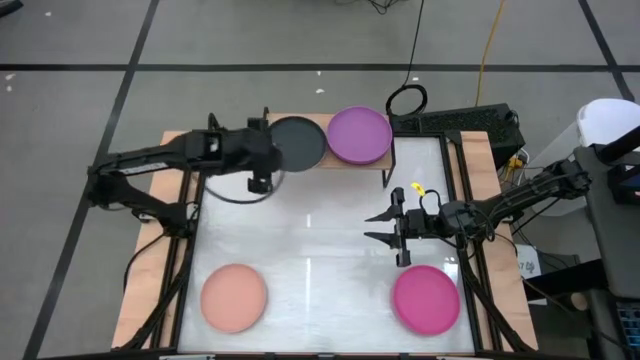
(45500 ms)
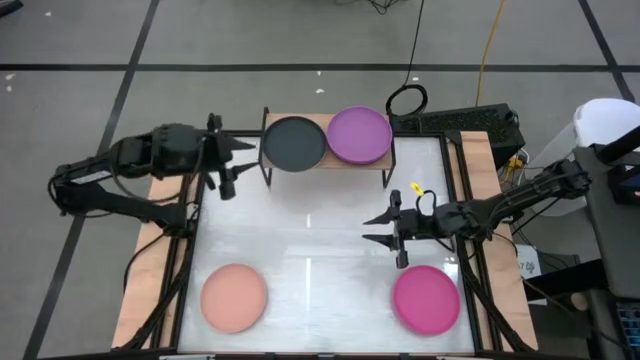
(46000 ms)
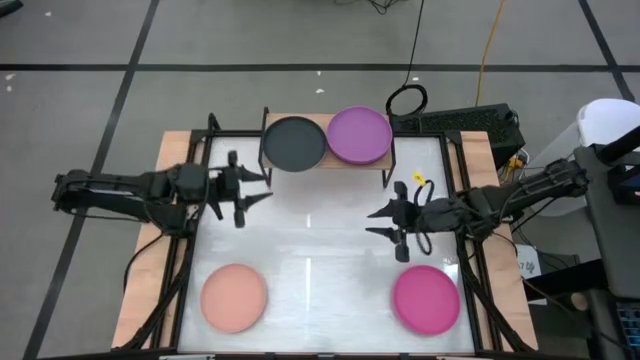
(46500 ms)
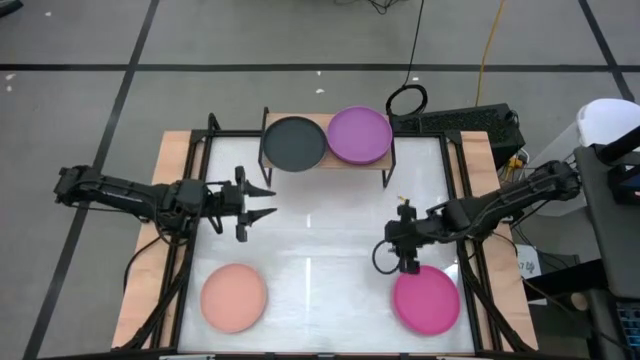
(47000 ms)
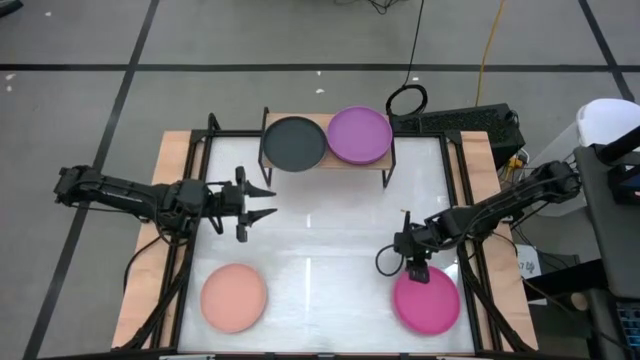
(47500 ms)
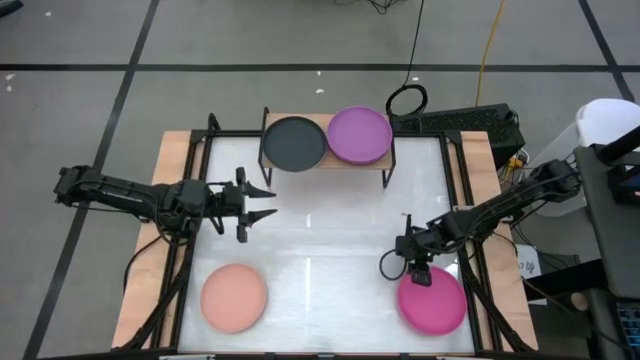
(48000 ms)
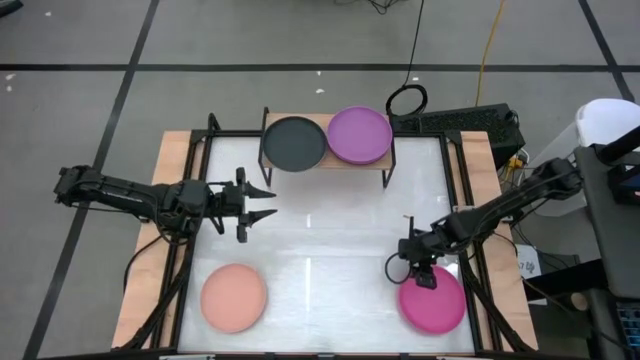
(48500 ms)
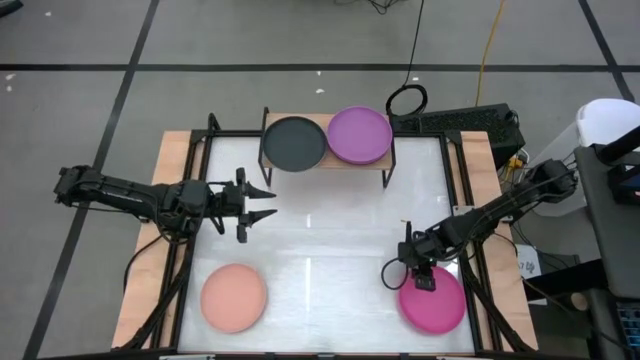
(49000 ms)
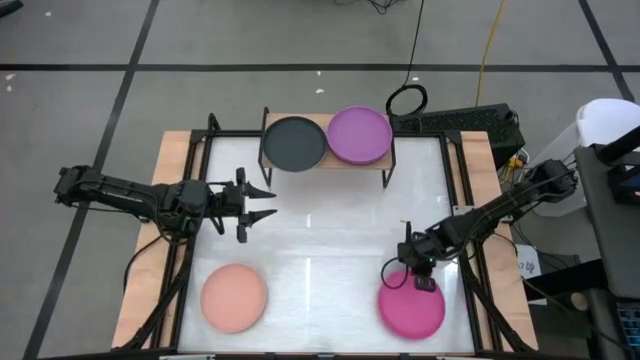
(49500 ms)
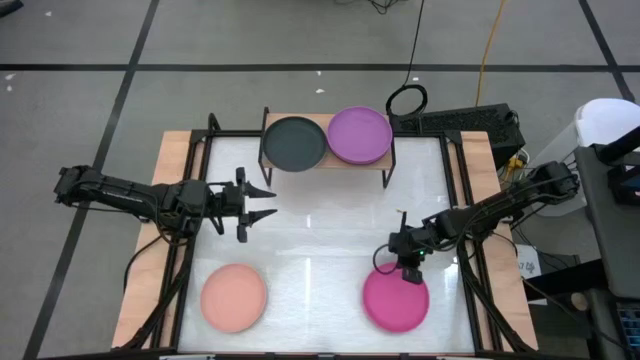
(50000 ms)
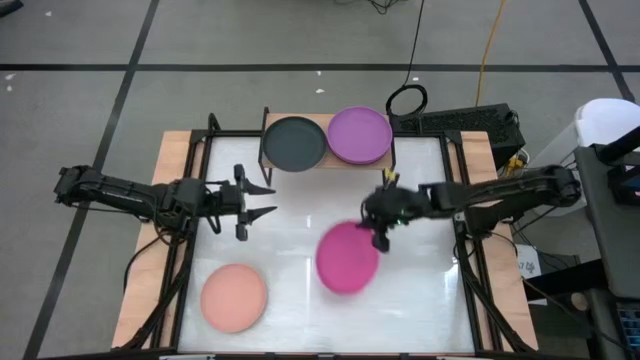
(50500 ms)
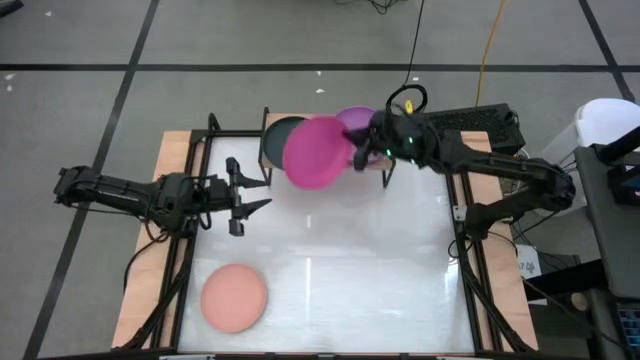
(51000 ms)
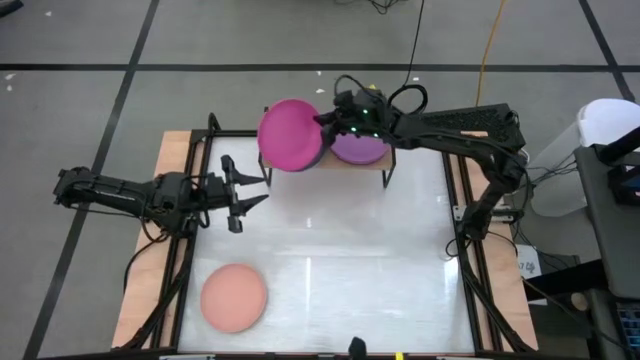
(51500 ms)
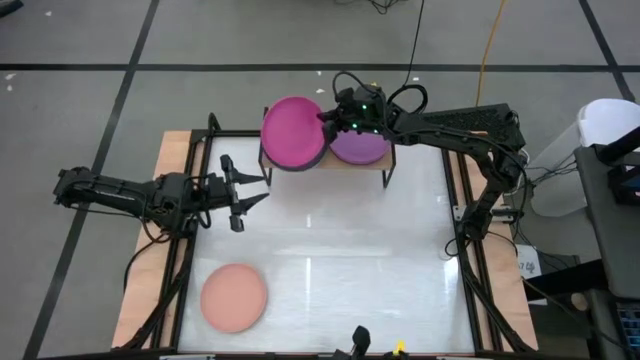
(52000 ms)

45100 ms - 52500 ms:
Task: Place and stack plates onto a shelf
Stack the pink plate on top of the black plate on the shelf

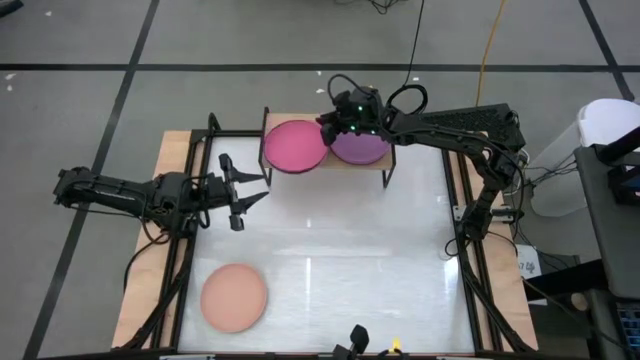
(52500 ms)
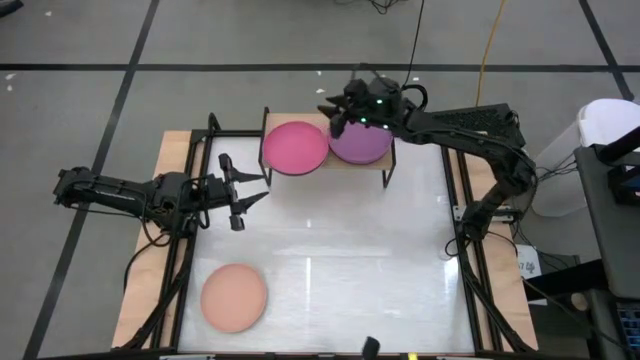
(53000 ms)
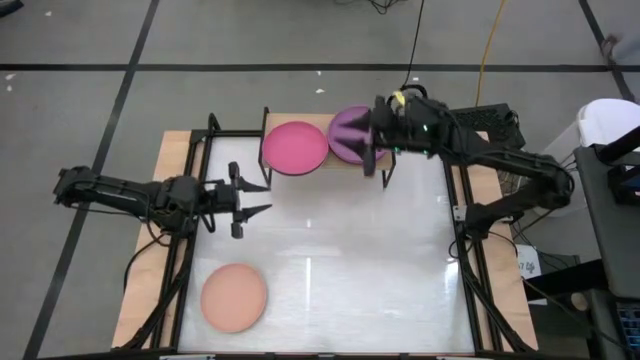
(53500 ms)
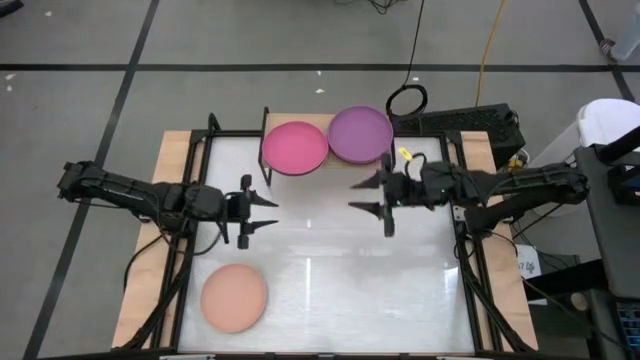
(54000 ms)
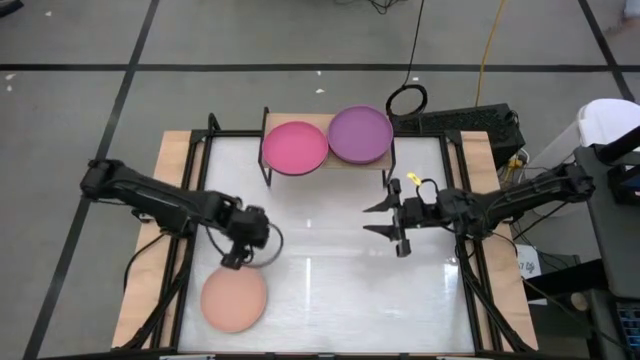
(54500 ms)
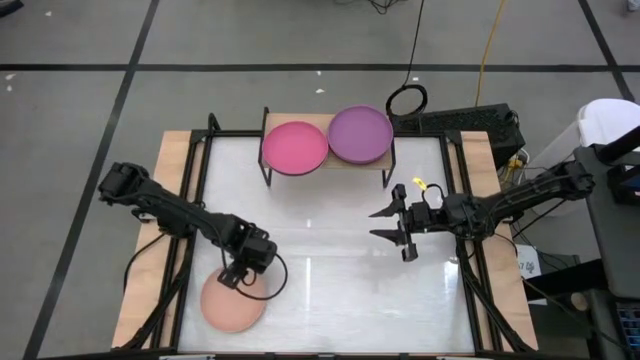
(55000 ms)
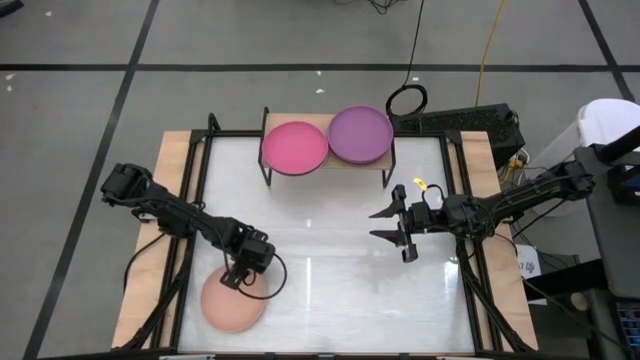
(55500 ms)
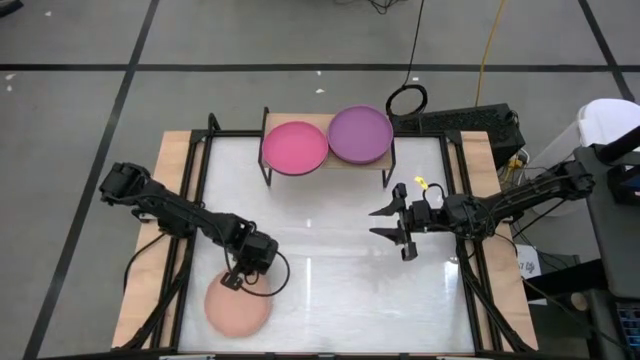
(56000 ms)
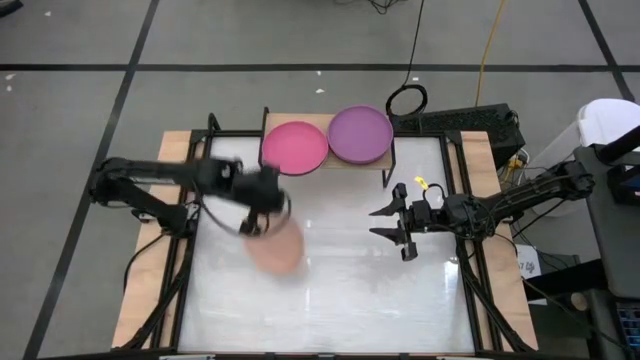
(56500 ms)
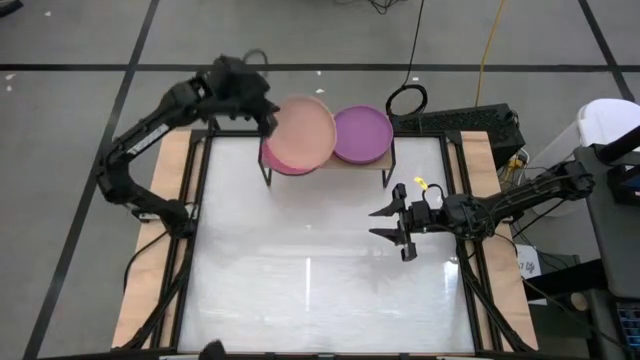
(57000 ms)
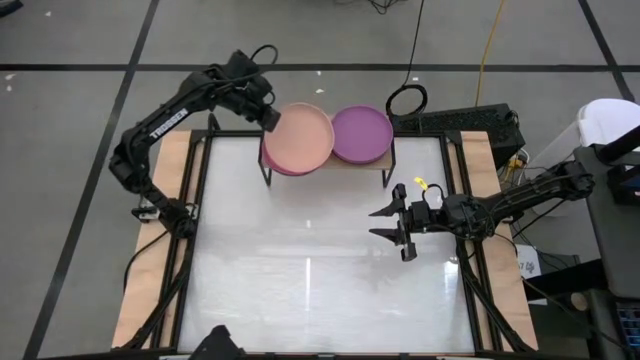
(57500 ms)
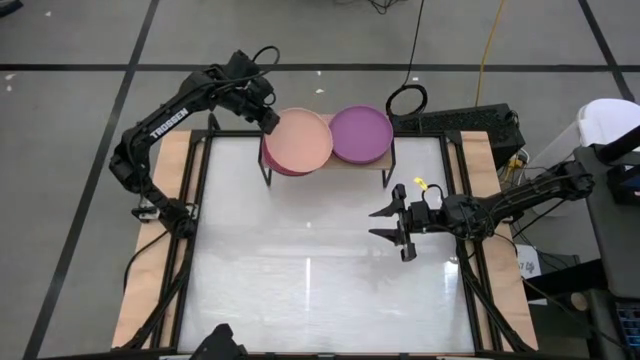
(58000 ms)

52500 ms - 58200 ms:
Stack the light orange plate on top of the pink plate on the shelf

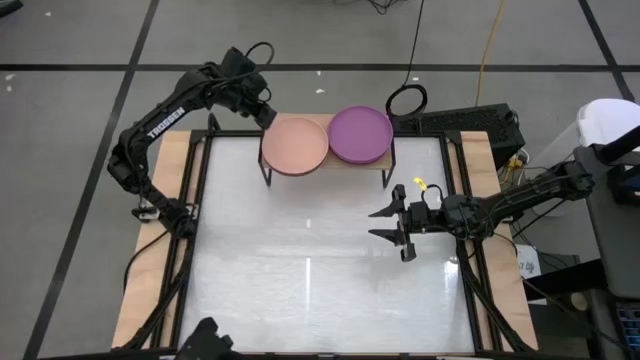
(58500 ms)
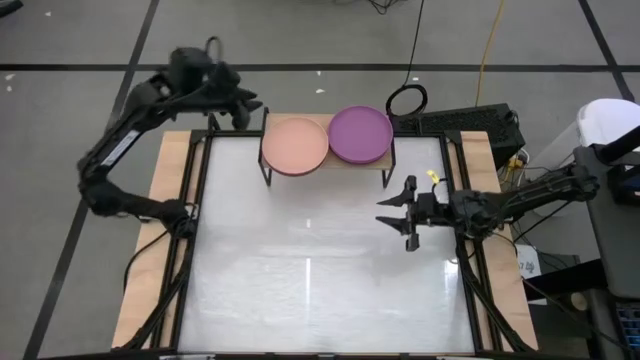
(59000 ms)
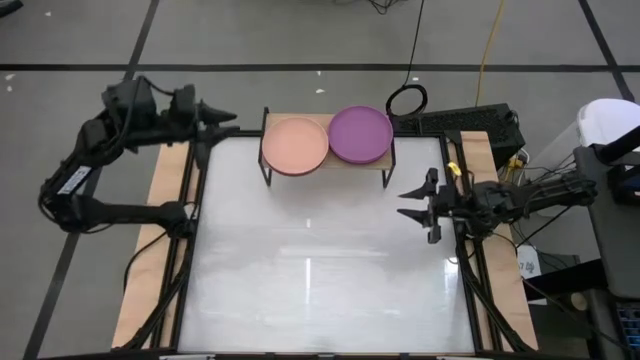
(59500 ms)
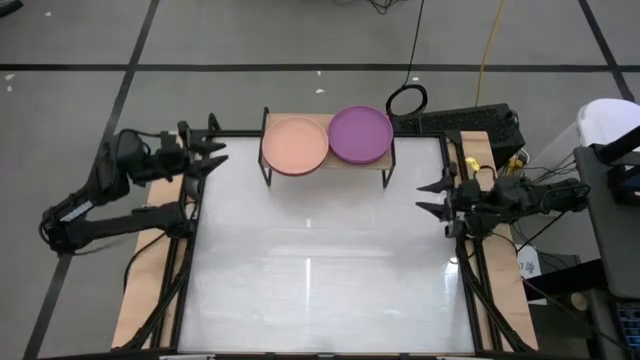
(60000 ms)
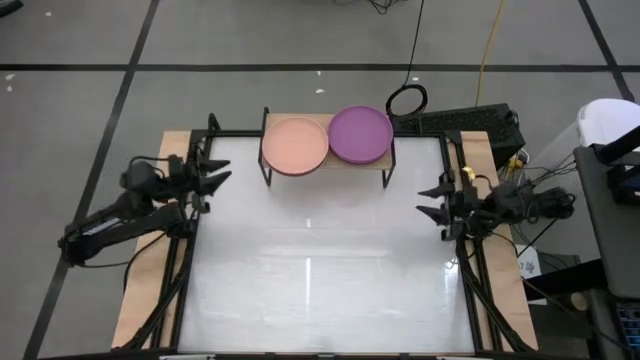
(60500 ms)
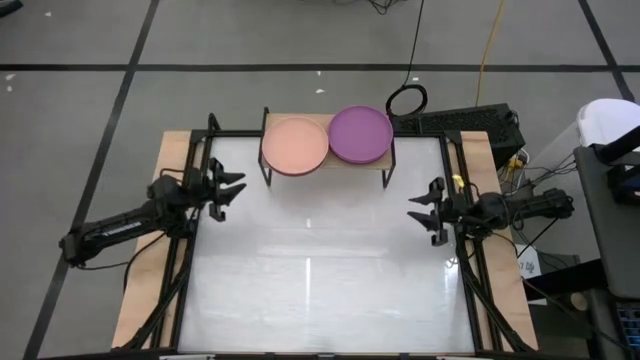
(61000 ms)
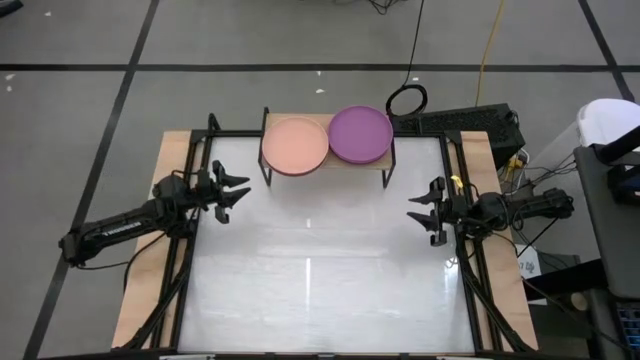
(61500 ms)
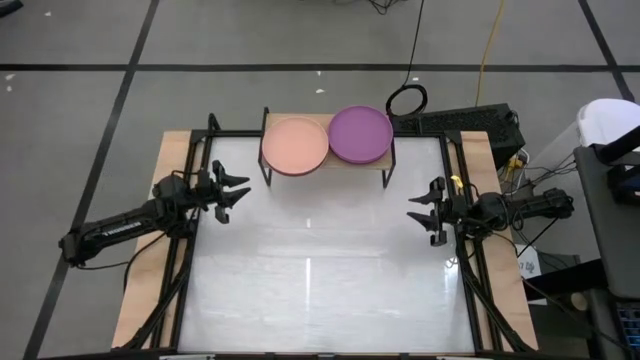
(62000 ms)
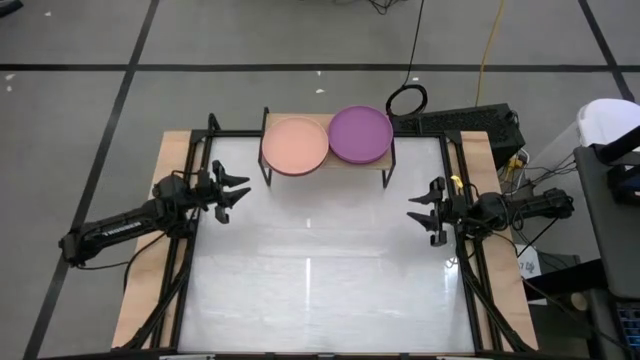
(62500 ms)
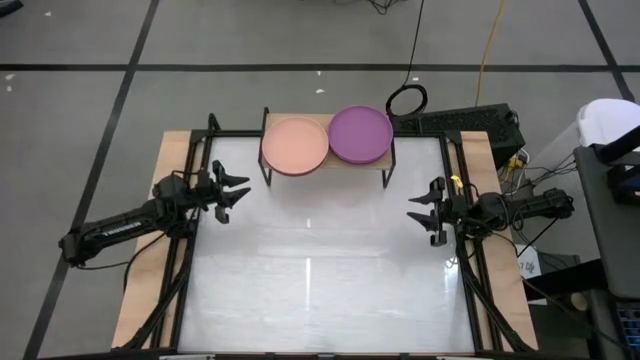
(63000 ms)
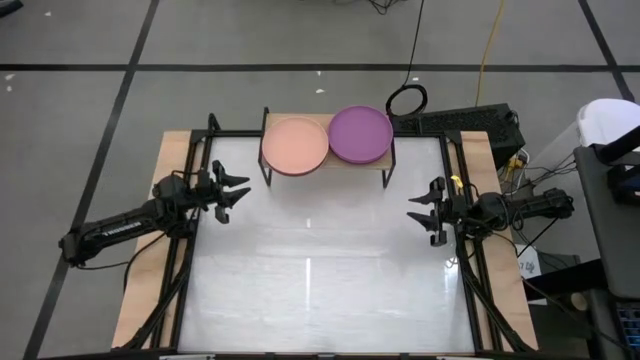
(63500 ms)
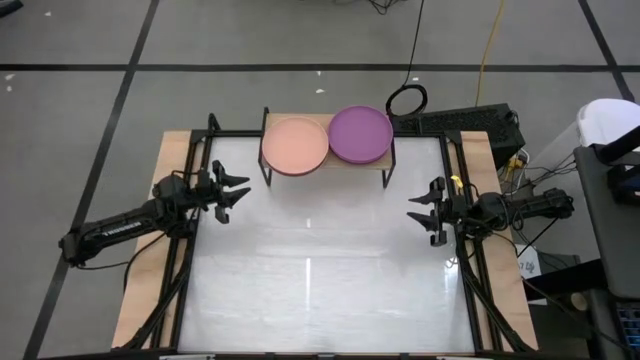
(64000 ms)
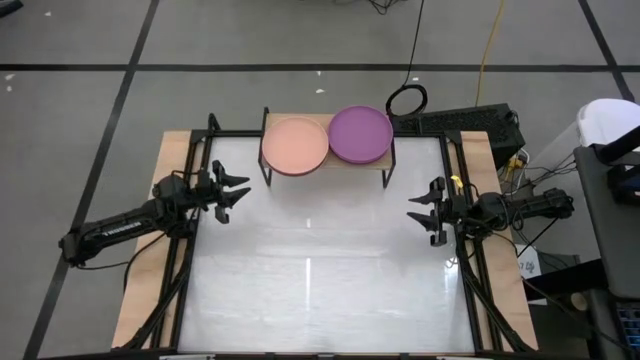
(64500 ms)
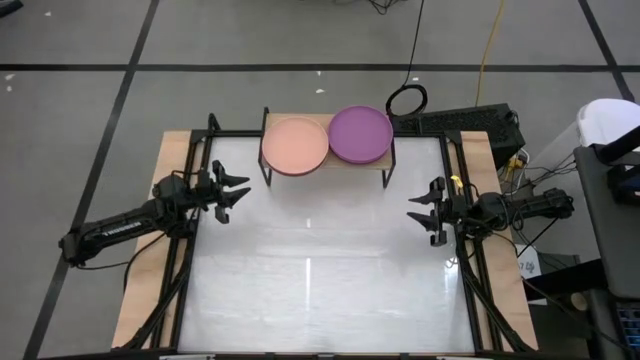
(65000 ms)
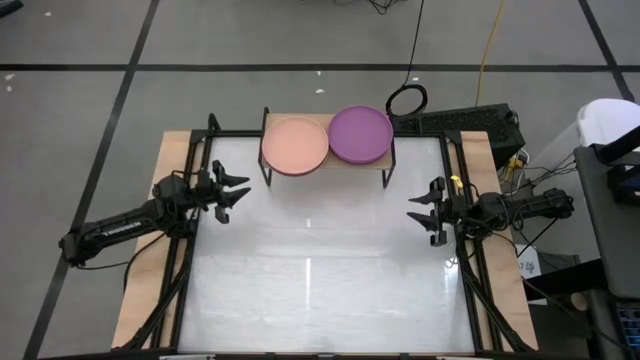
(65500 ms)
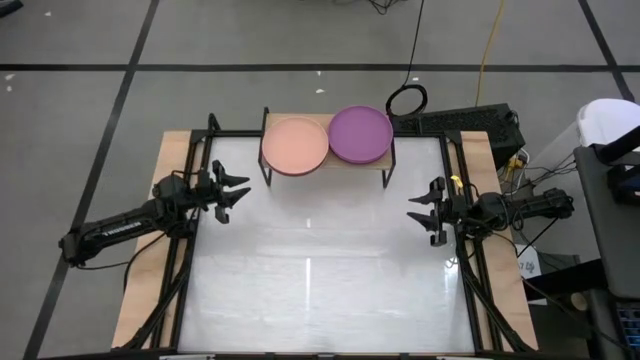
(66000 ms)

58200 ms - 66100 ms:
Return to Home Position

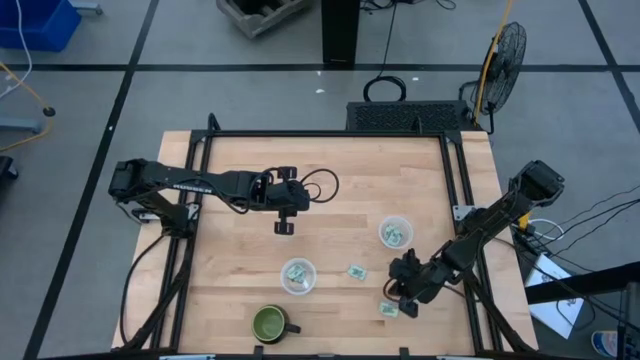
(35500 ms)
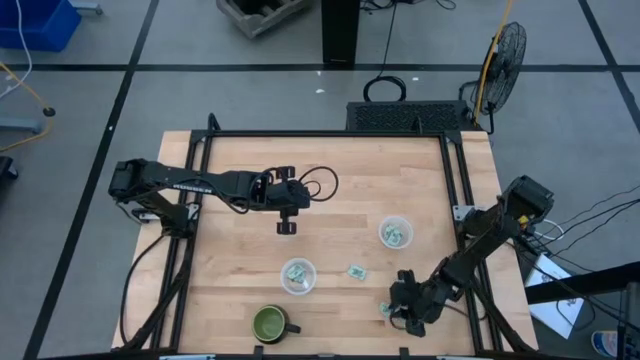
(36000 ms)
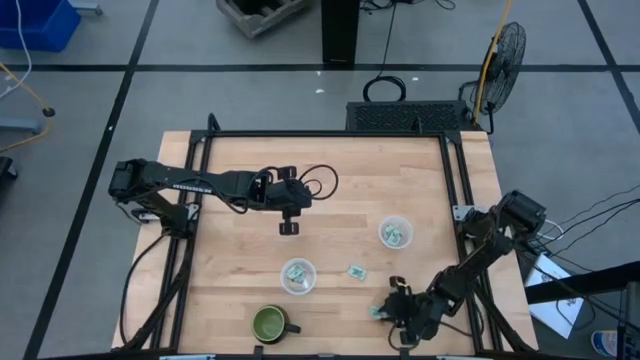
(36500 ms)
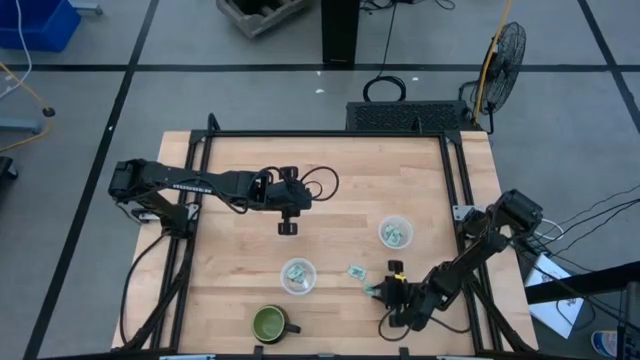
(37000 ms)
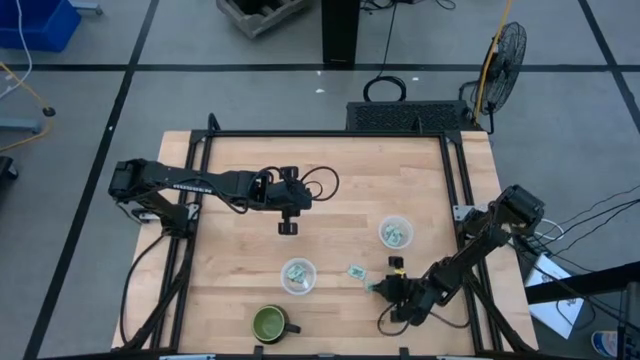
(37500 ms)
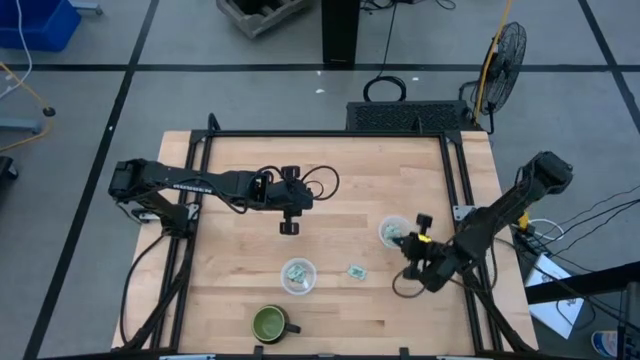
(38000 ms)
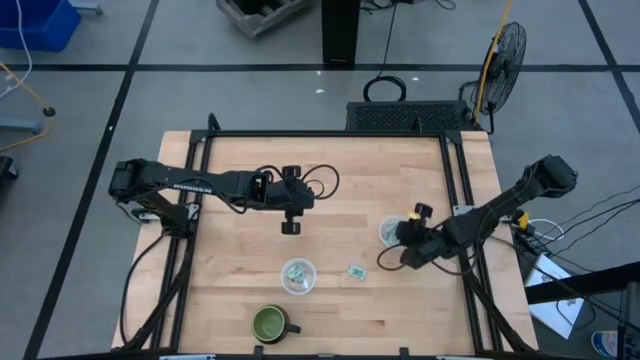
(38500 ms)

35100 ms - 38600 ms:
Task: Pick and place Stevia / Truvia into bins
Put the white stevia packet into the right transparent container
